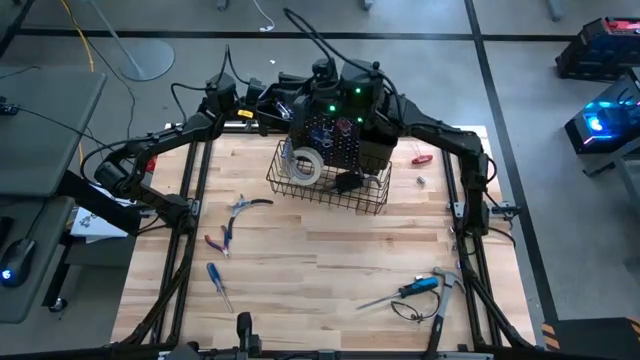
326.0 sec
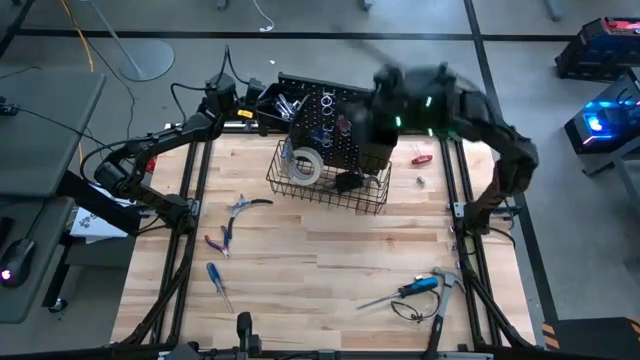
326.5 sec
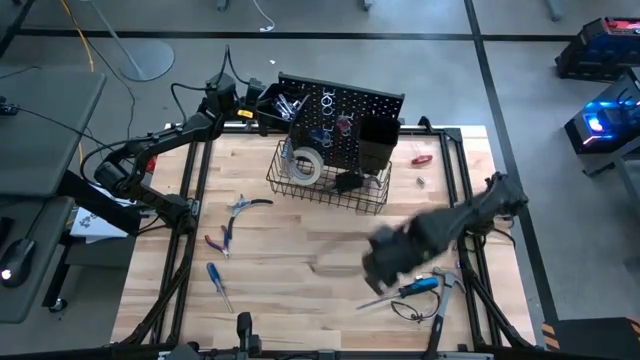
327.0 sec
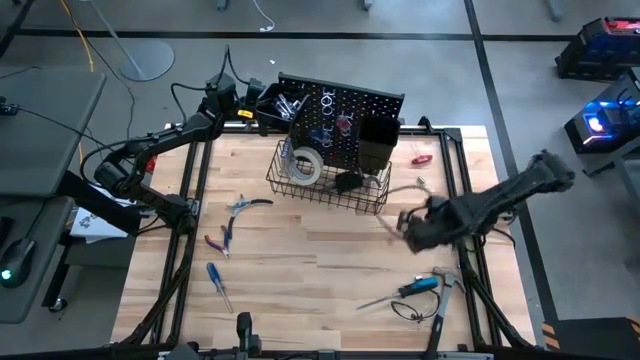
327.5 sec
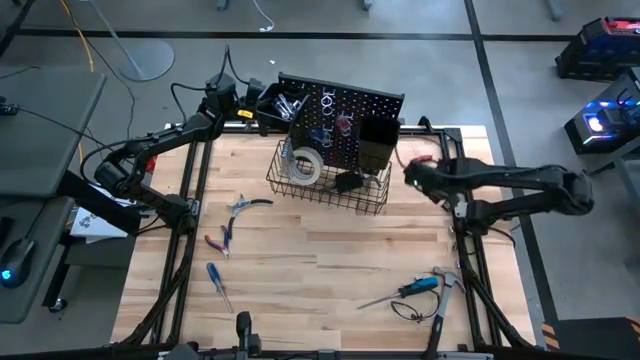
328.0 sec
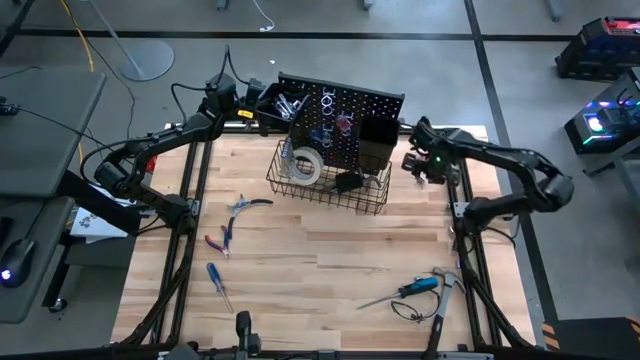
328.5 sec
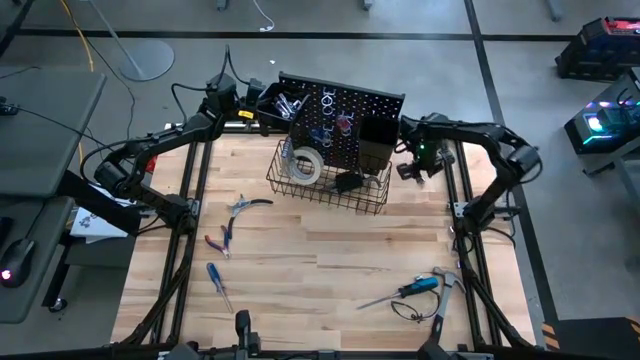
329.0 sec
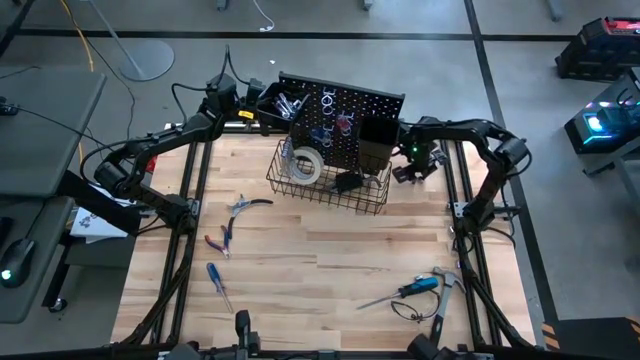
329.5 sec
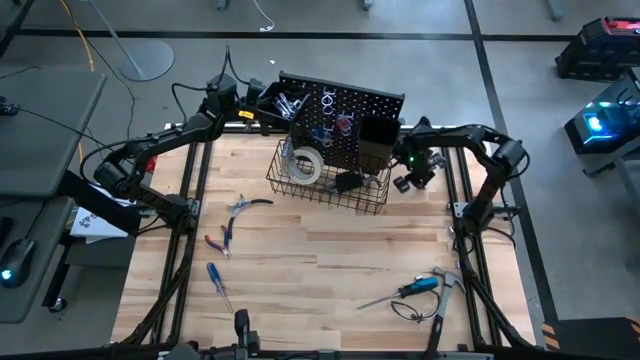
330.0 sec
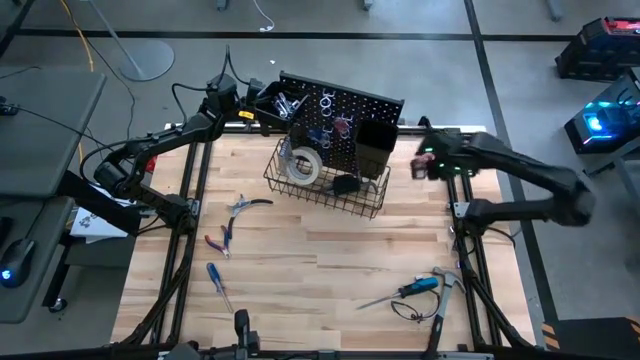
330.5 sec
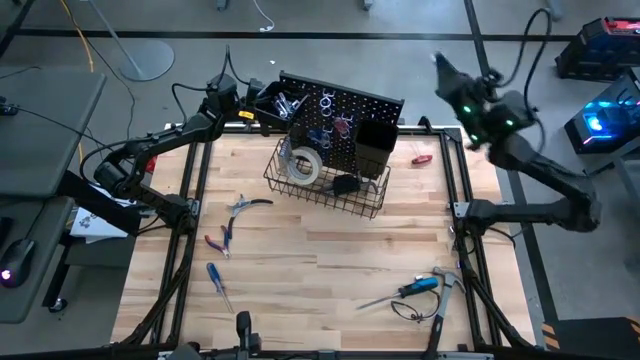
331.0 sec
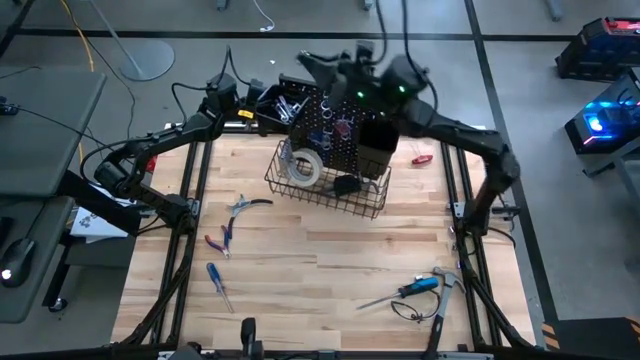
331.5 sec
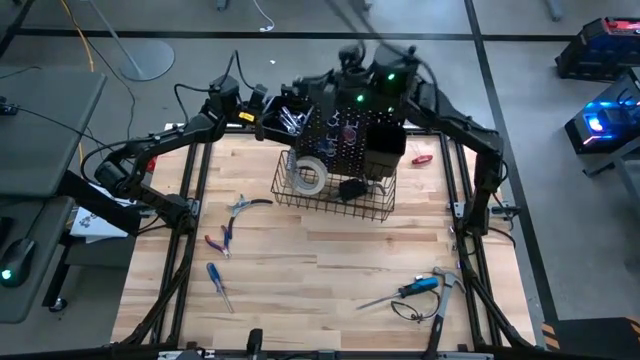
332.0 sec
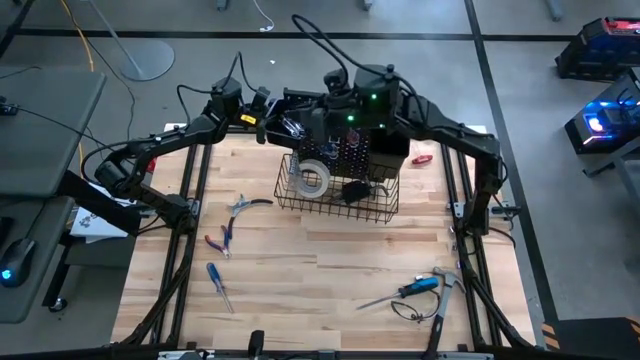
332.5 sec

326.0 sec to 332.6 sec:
Task: Hang tools onto peg board
Put the socket in the left black bin on the pegboard

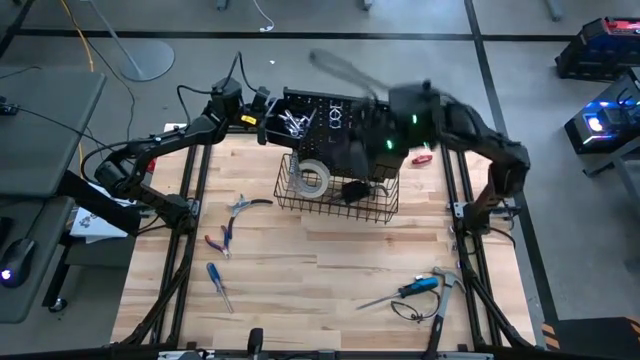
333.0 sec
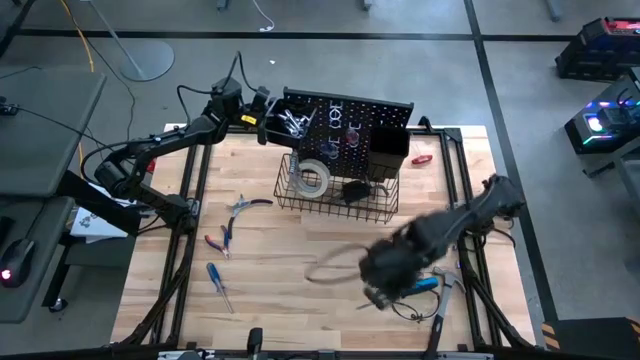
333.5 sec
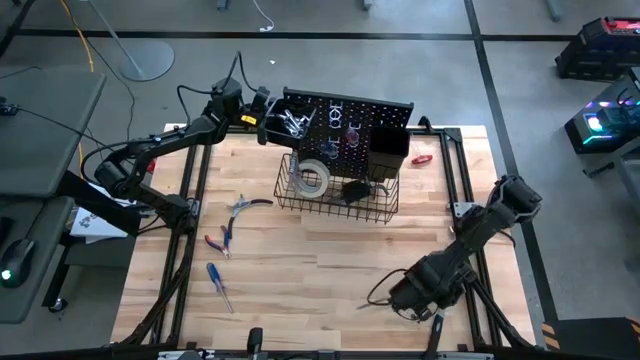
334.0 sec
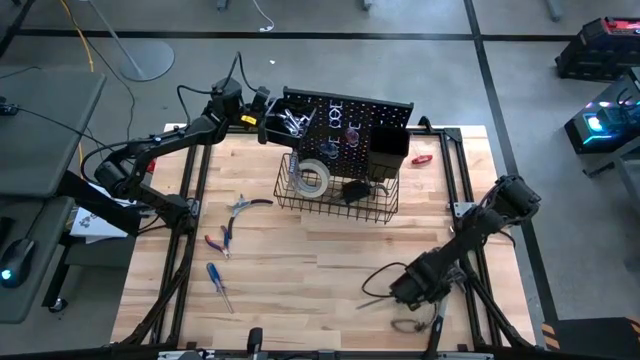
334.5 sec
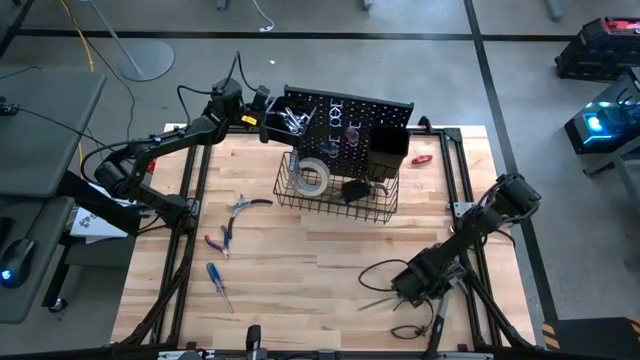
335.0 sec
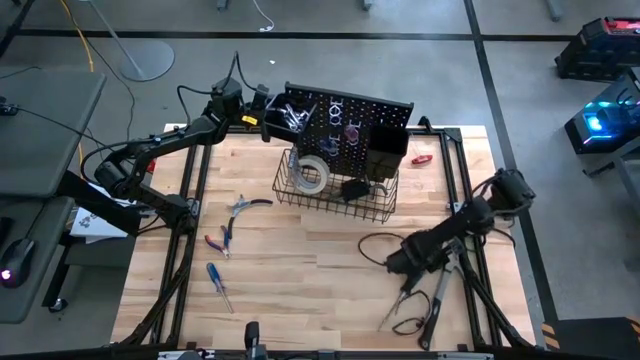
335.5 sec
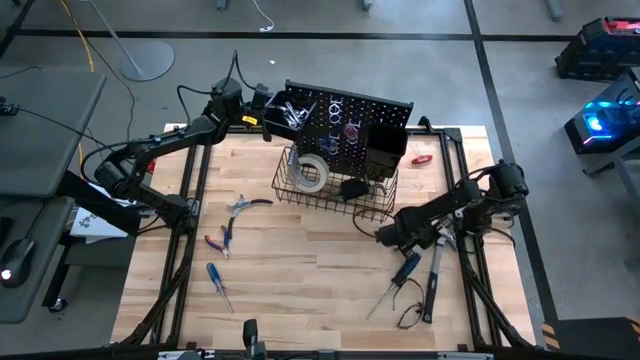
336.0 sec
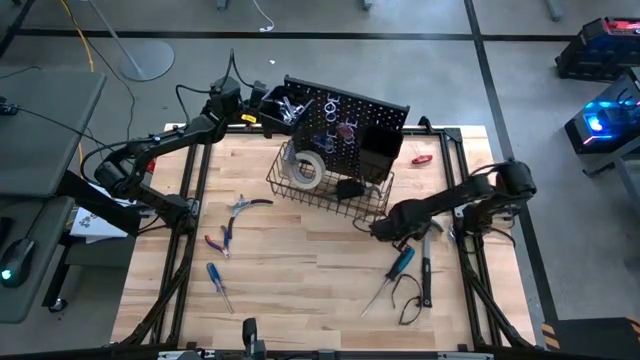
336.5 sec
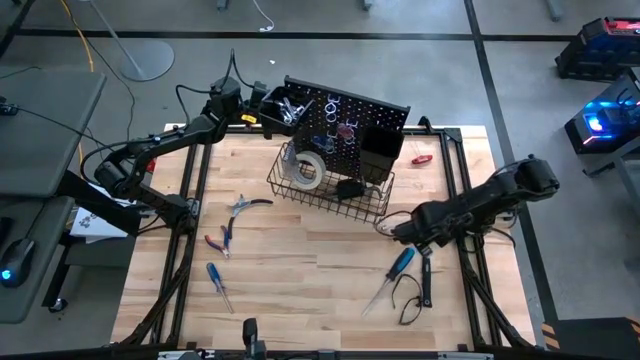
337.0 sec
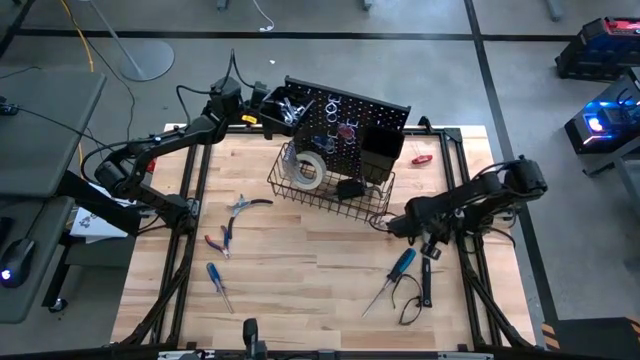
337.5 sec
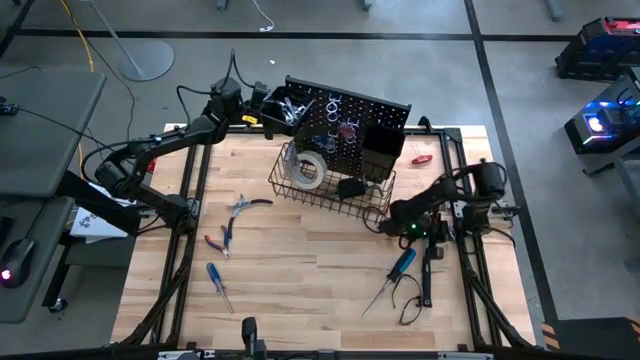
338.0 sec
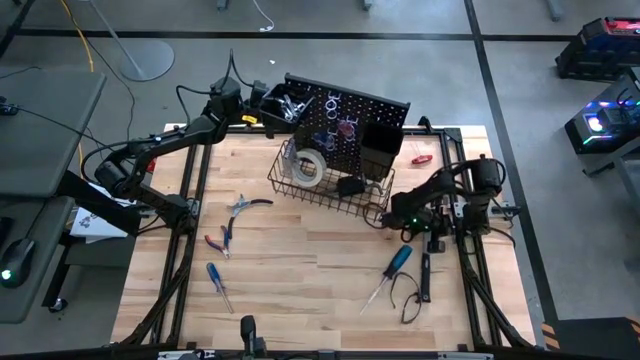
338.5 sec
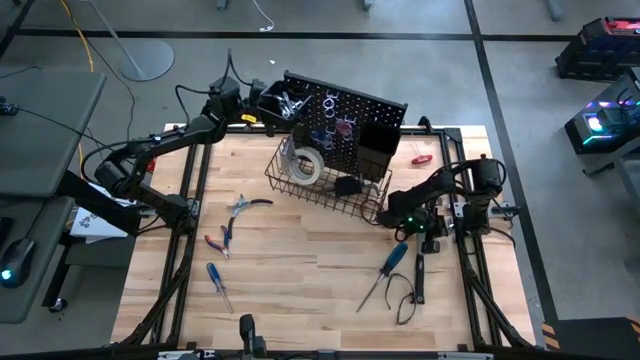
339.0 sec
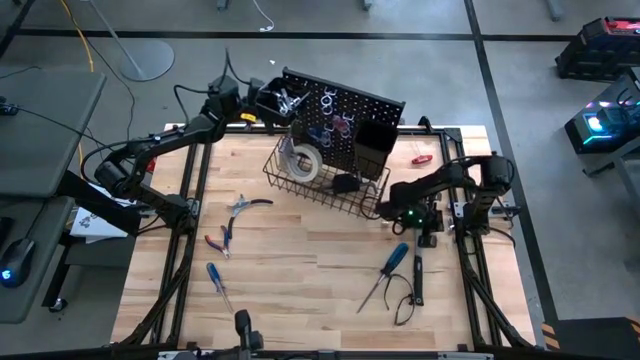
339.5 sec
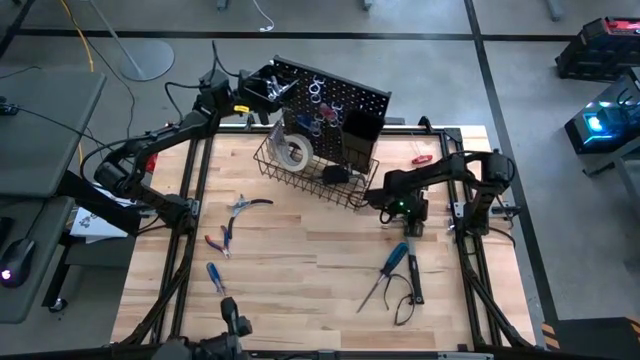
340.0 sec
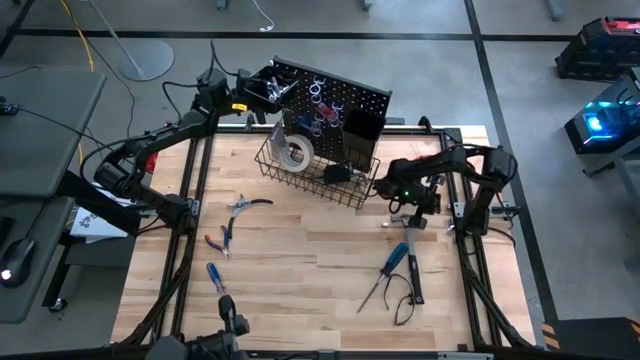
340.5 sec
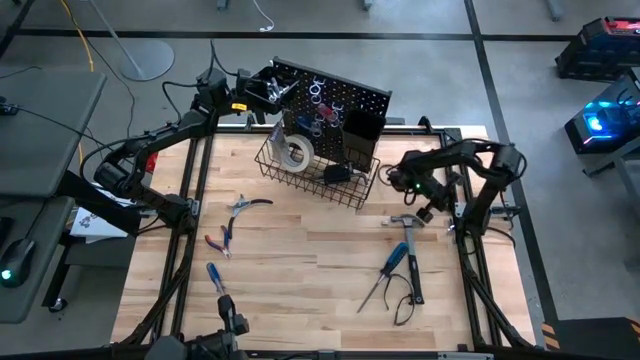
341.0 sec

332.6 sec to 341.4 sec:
Put the socket in the left black bin on the pegboard

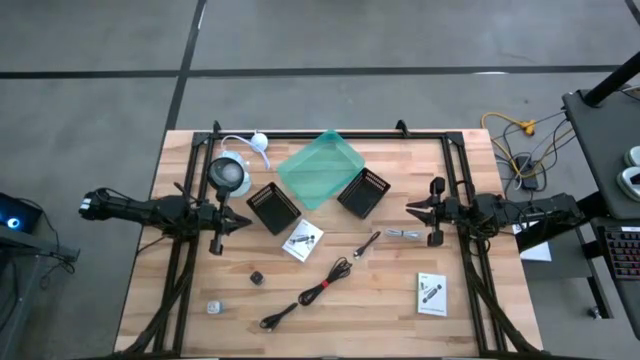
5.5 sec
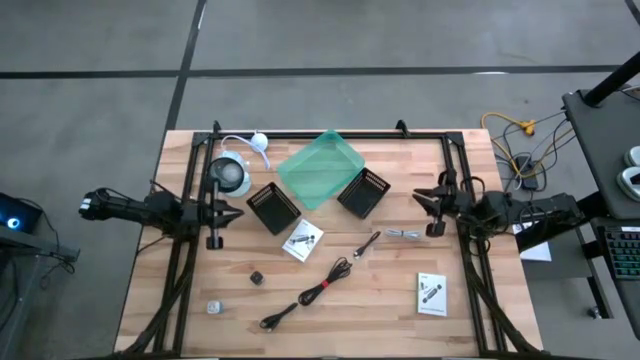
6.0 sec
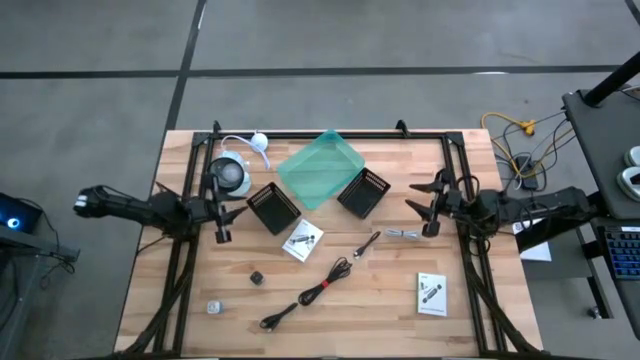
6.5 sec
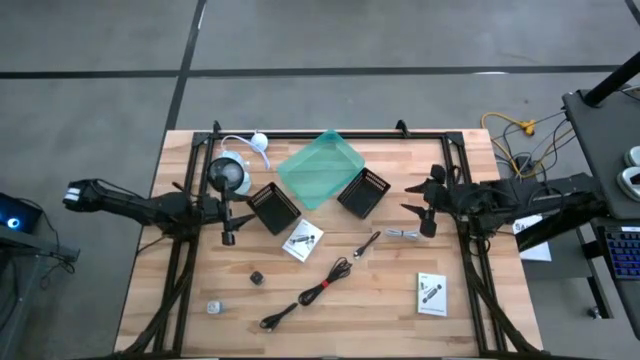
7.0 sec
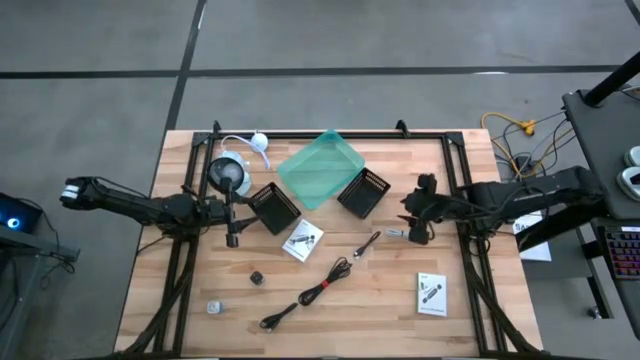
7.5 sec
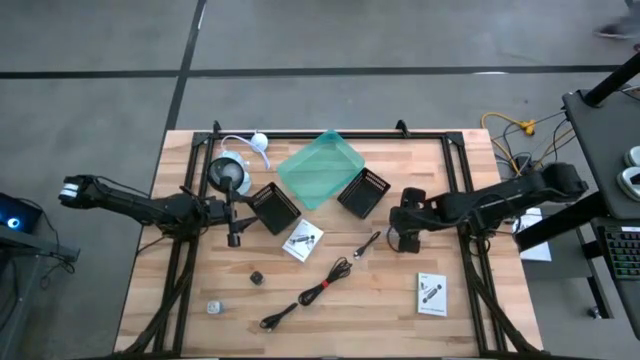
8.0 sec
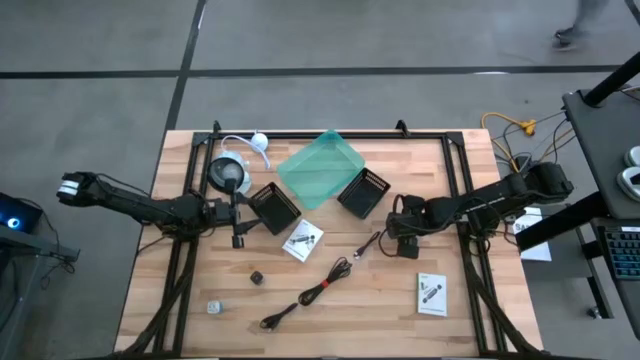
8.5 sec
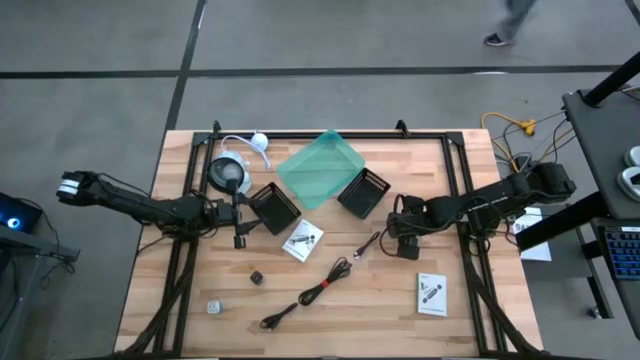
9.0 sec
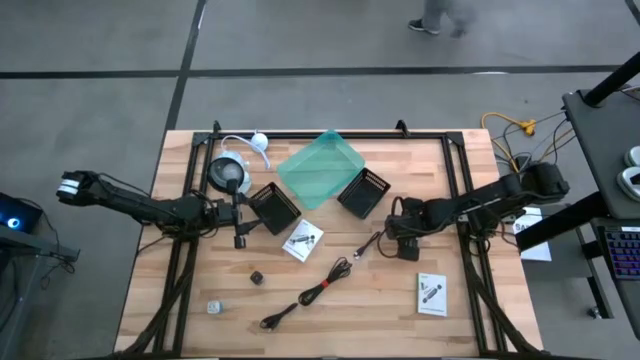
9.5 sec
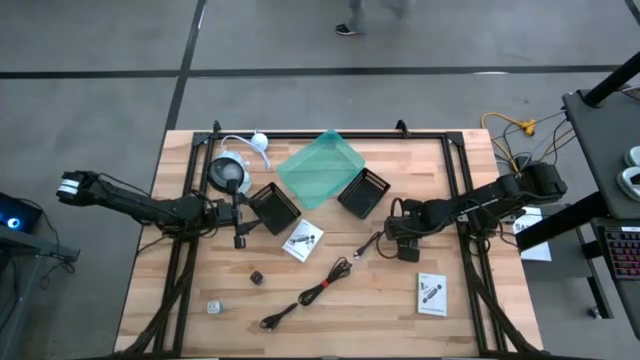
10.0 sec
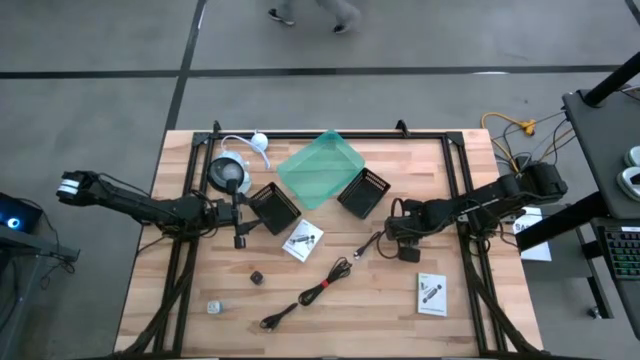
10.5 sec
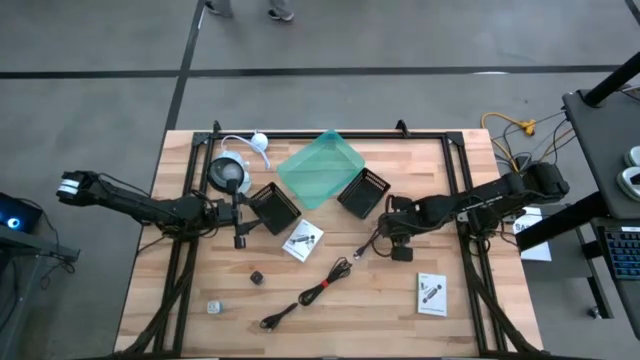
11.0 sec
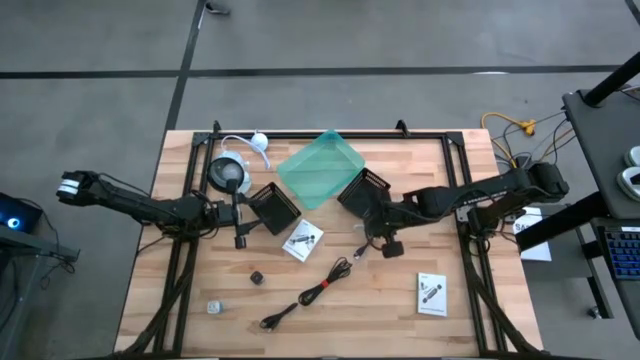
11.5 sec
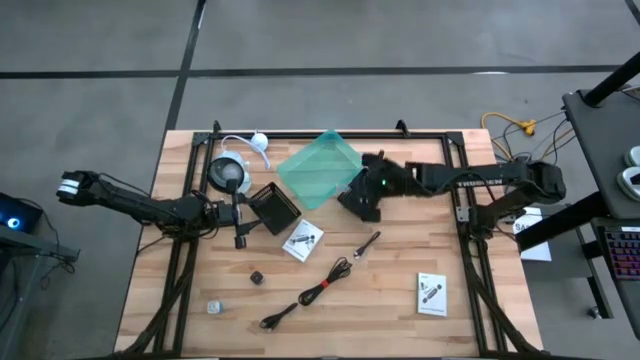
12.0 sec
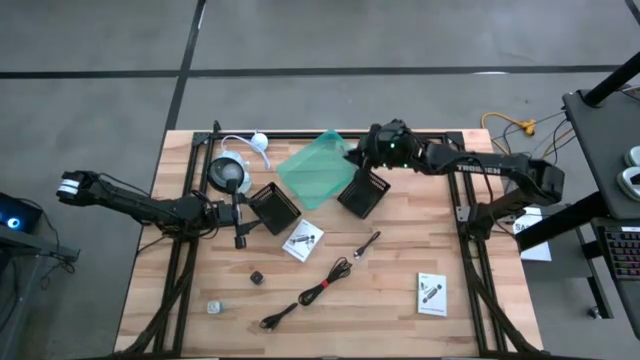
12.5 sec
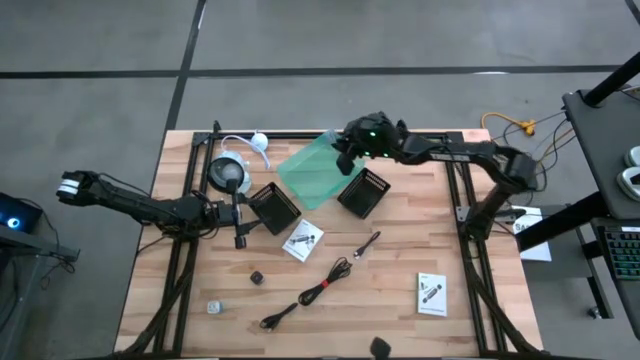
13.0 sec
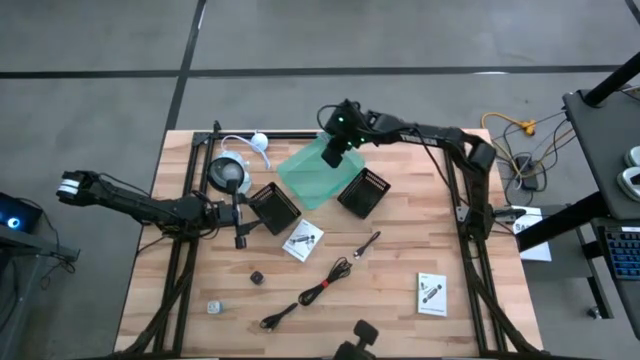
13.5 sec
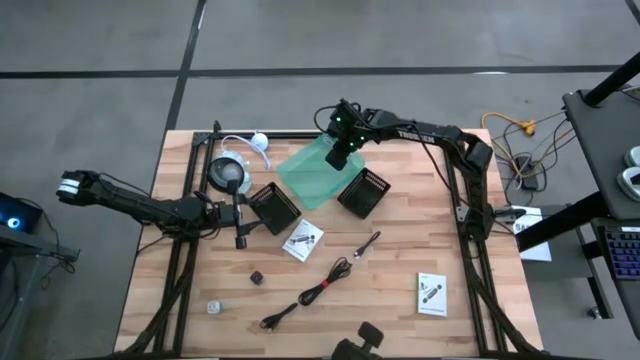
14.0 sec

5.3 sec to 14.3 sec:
Task: Pick and place items into bin
Put the white charger cable into the green bin
